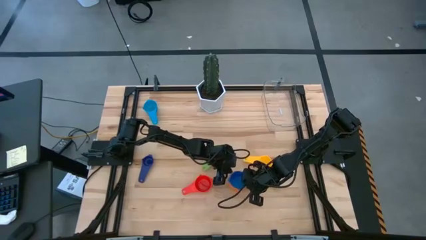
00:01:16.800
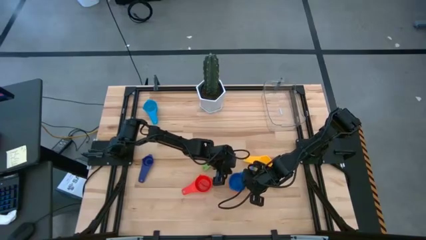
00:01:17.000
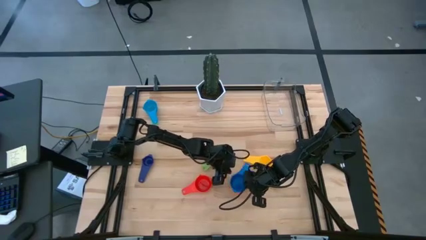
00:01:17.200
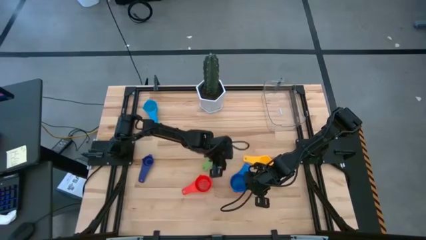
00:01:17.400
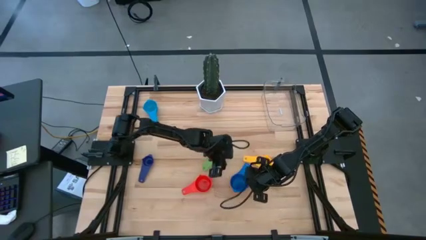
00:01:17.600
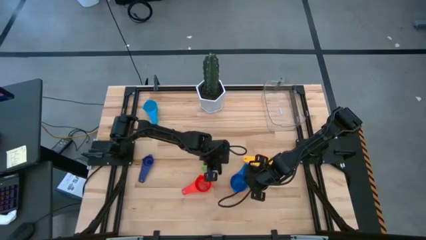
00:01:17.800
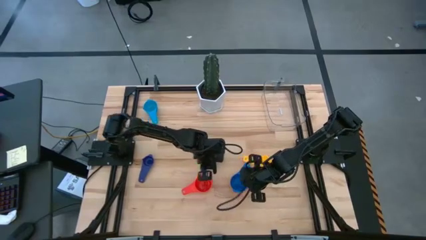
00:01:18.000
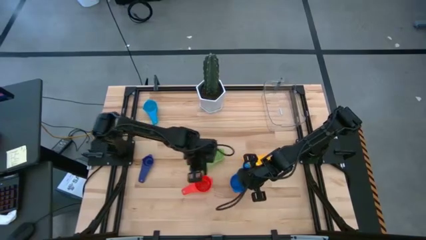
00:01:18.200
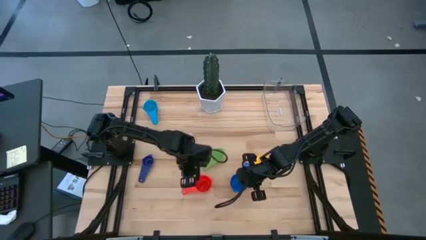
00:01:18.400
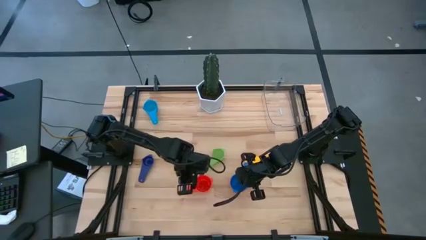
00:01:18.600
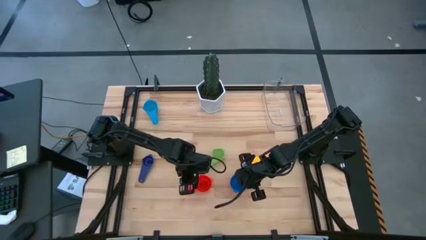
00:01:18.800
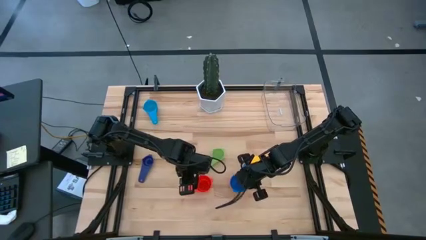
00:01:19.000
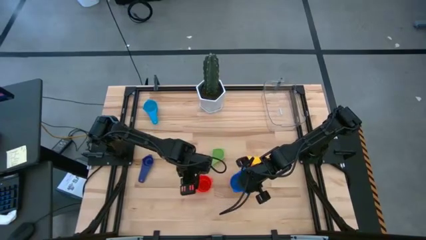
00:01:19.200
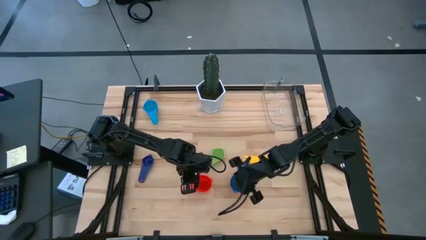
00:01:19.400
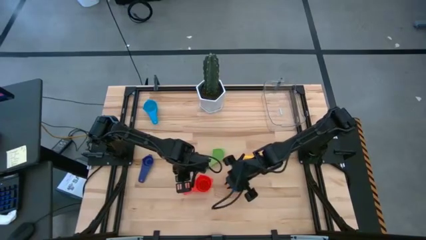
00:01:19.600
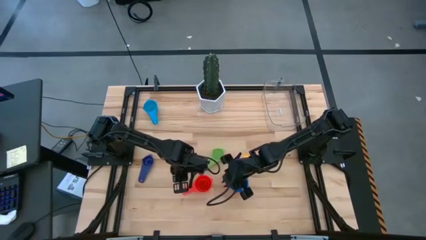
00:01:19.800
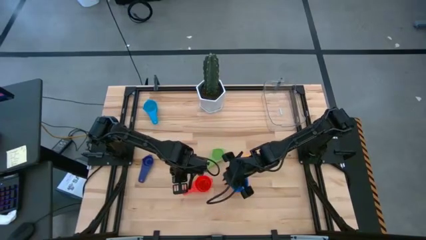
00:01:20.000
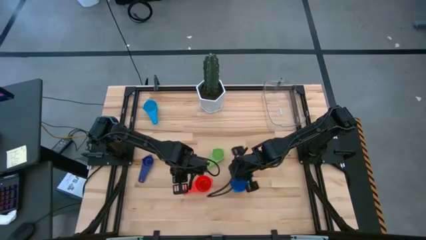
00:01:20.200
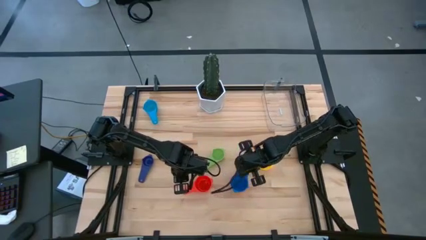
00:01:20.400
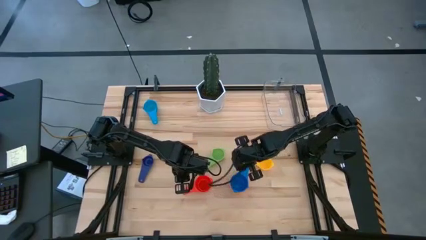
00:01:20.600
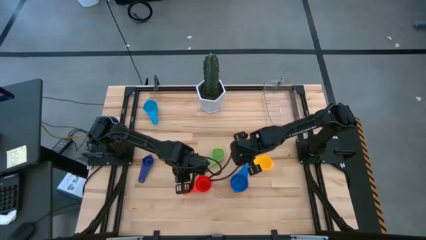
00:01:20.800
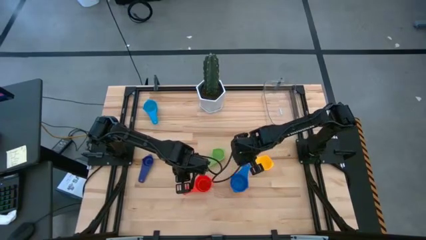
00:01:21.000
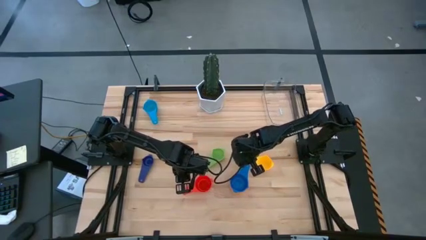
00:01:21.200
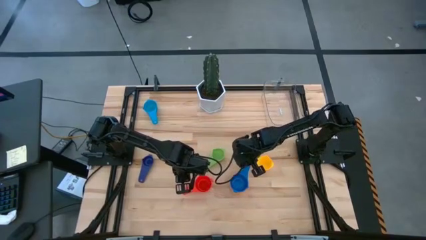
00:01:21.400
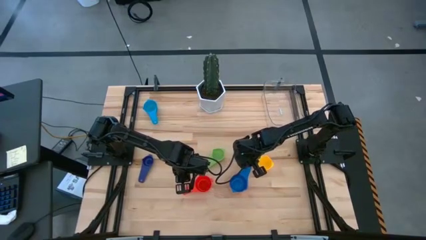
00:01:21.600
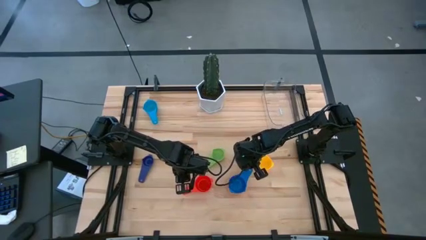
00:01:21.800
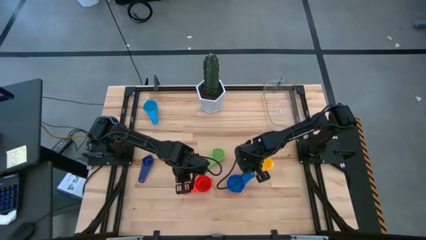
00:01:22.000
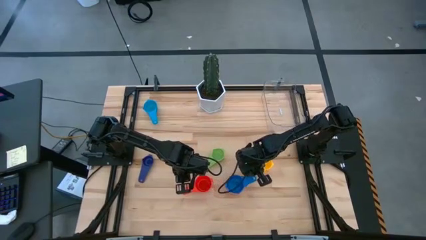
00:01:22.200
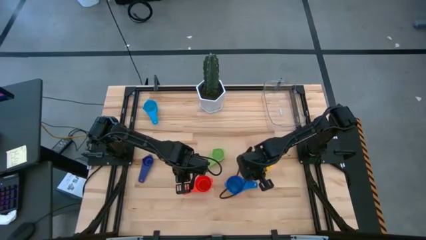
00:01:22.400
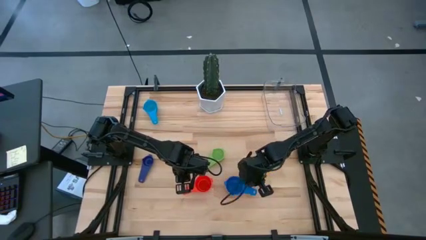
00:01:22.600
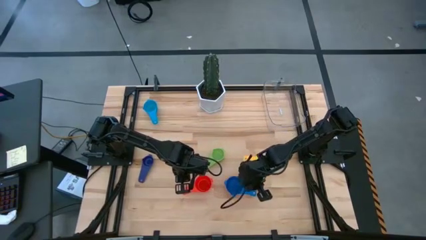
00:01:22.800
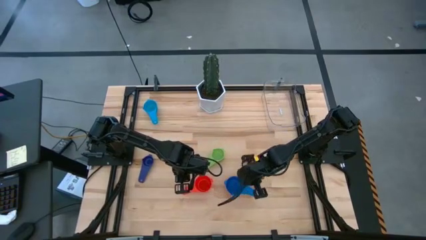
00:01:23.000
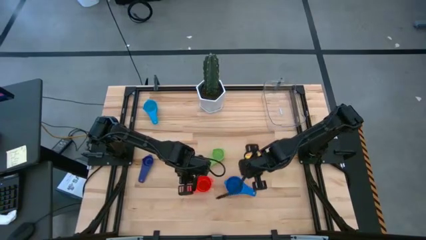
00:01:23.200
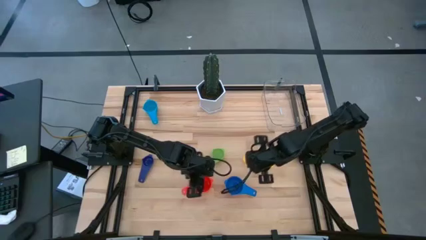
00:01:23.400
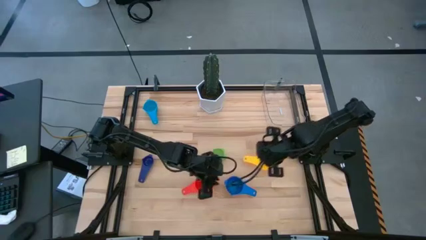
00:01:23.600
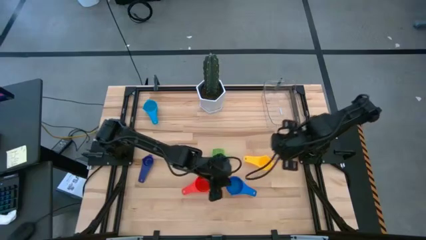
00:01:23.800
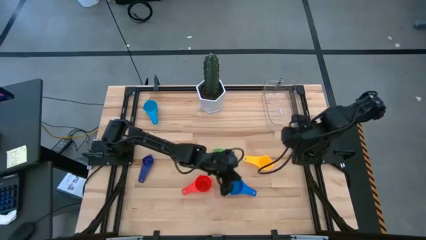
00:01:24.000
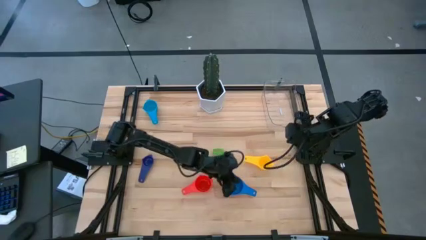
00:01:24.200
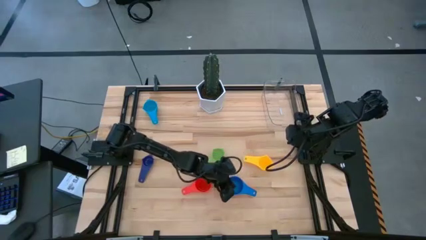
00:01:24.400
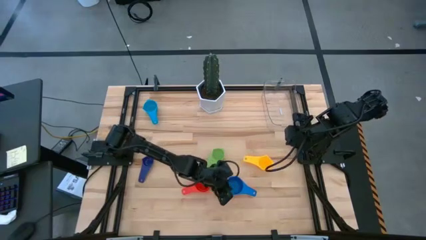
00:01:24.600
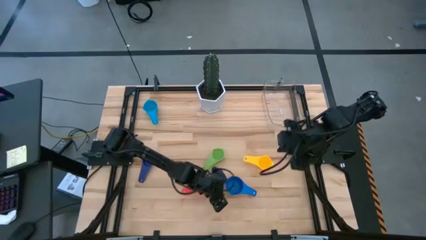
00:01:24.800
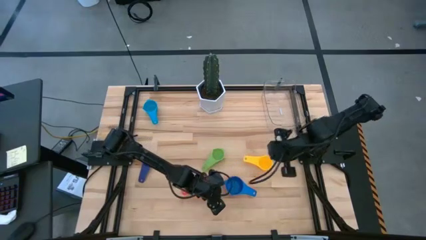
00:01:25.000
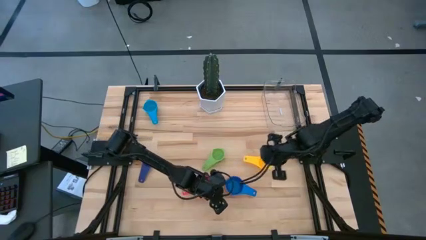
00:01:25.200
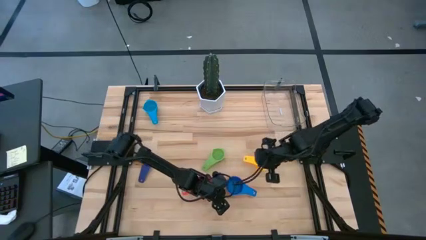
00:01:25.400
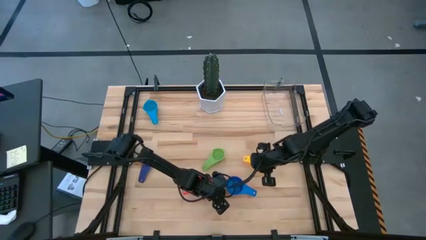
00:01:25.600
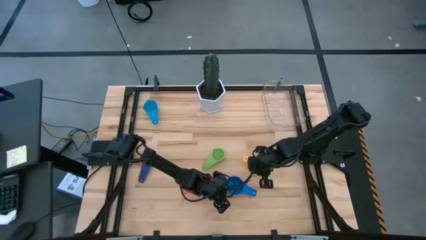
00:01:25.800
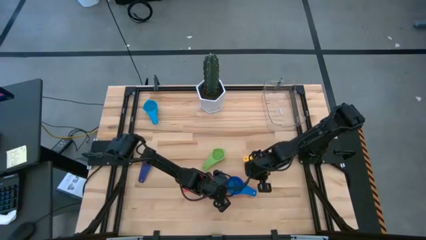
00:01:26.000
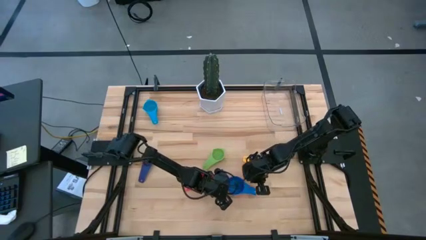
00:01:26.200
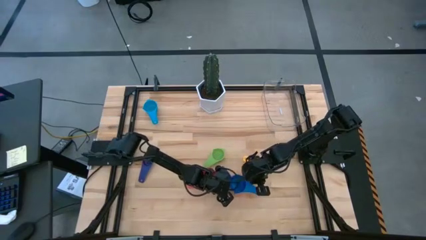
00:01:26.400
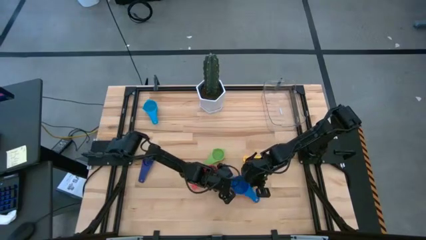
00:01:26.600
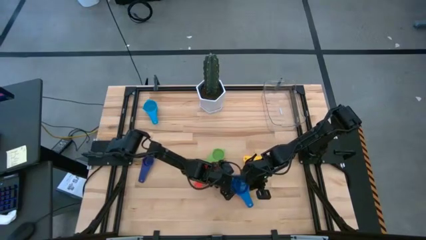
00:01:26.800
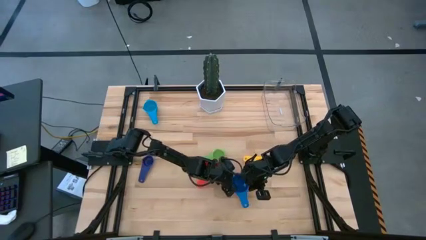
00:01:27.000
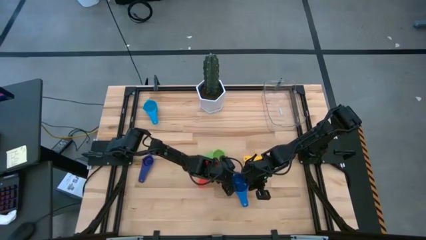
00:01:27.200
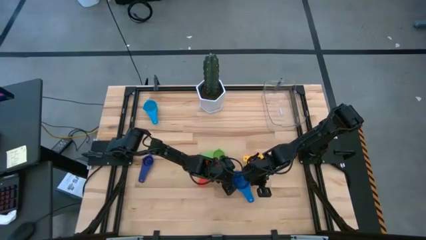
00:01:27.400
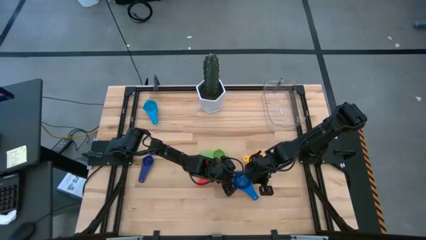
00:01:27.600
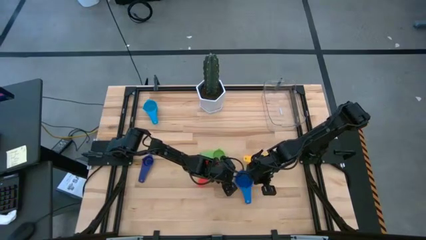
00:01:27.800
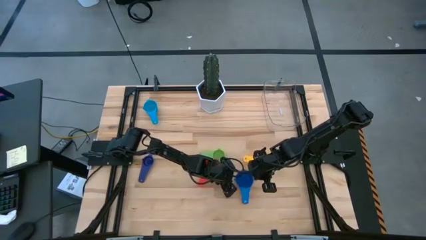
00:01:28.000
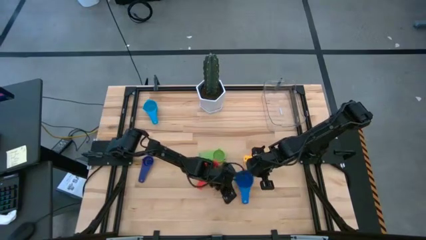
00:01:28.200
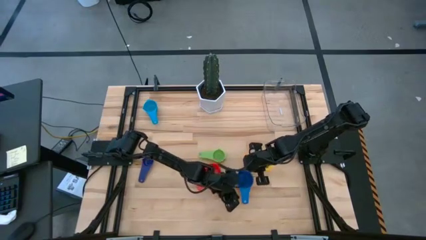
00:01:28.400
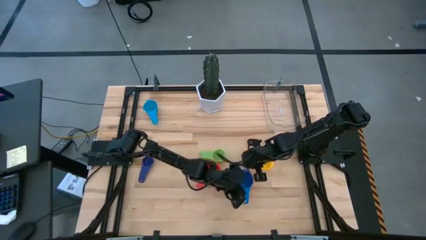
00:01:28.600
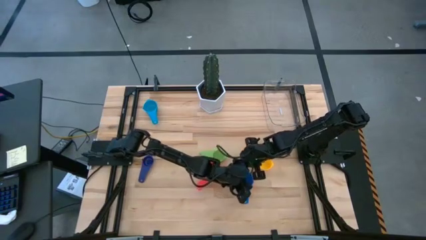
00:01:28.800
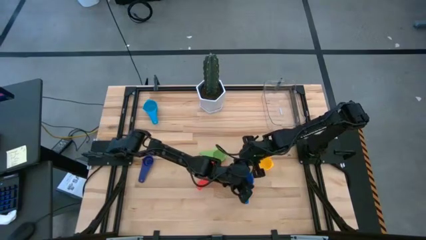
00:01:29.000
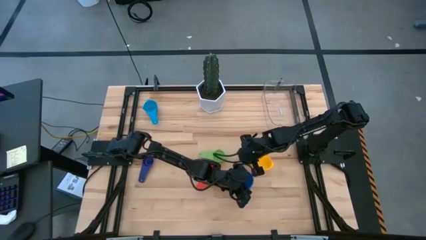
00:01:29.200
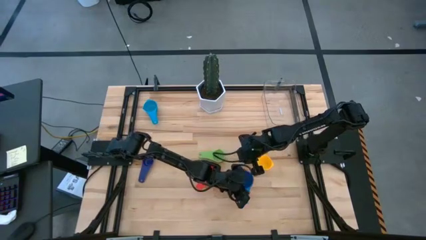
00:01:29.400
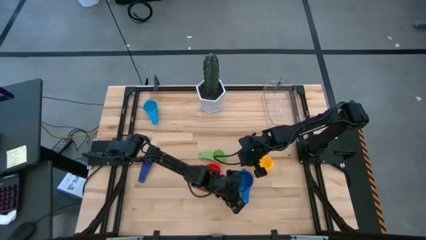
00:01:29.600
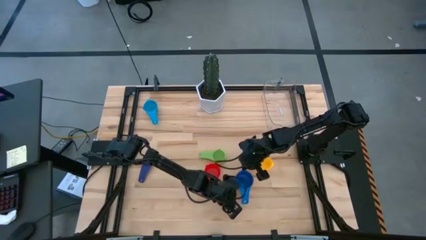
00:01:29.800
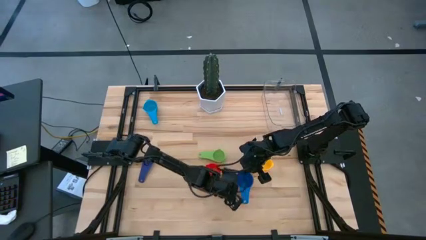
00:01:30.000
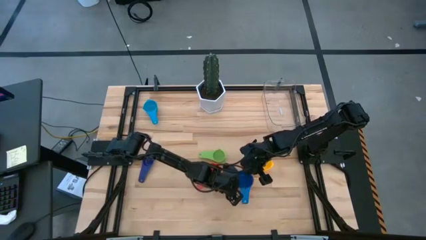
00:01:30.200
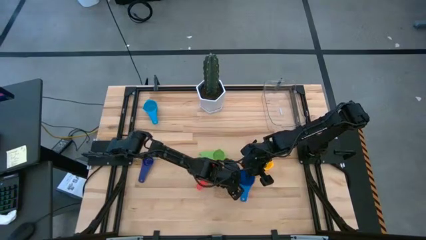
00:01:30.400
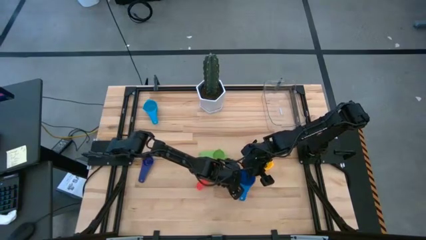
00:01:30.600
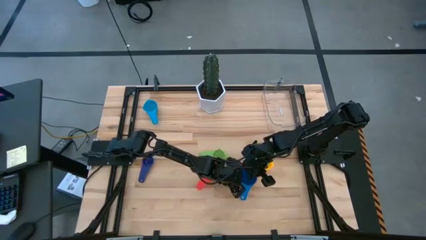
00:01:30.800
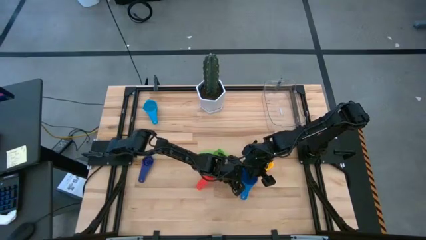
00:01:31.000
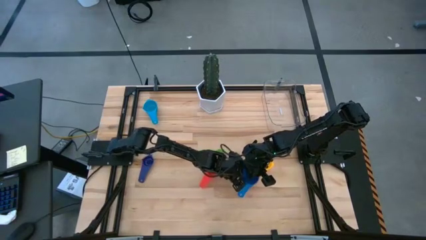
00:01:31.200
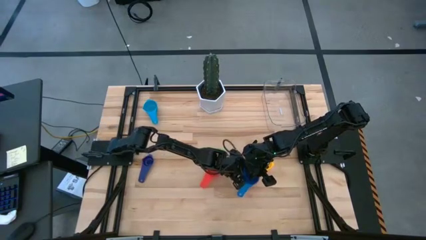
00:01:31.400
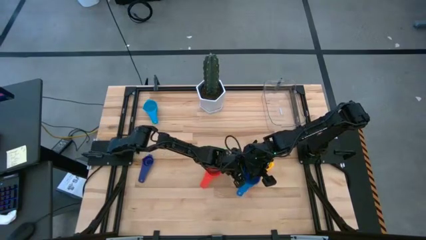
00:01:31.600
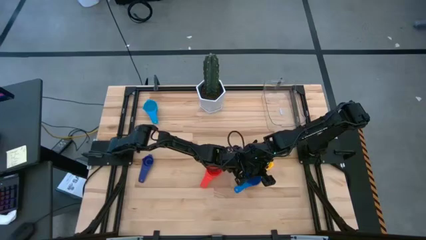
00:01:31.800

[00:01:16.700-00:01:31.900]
Task: Nest measuring cups in basket
Adjust the stacked measuring cups
